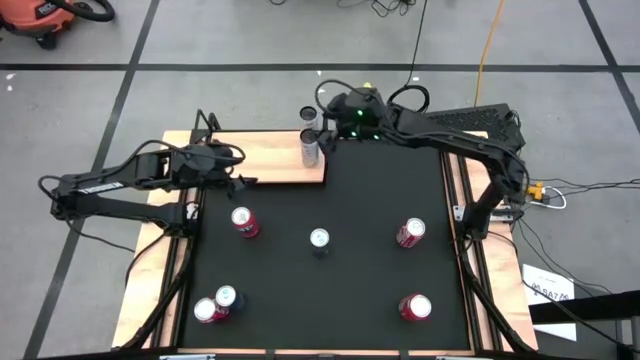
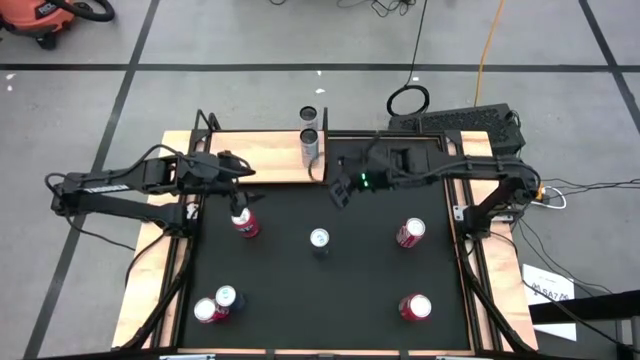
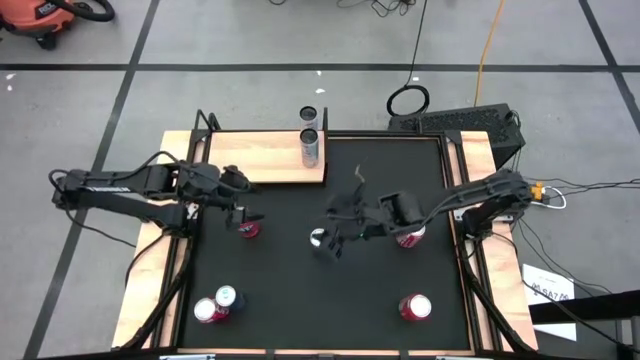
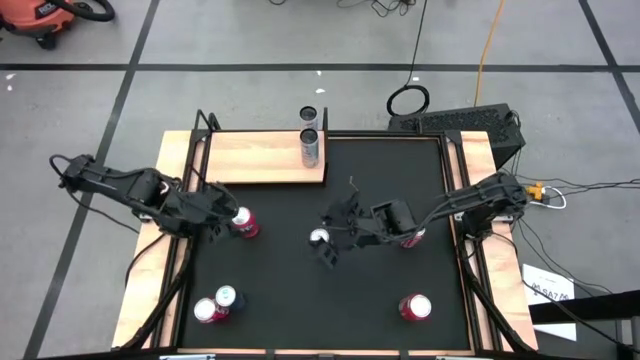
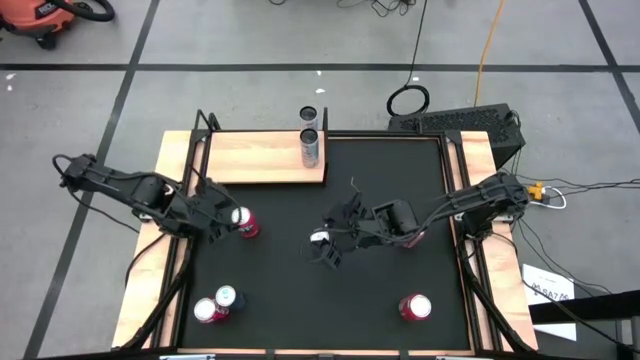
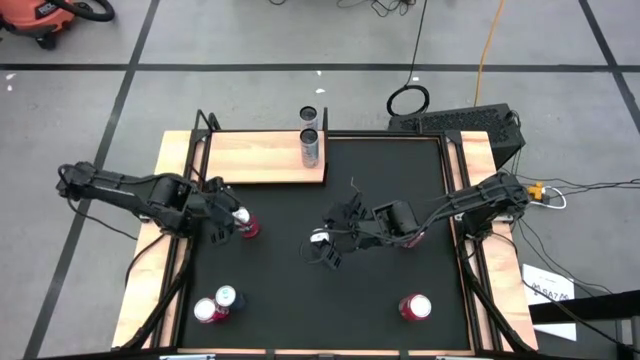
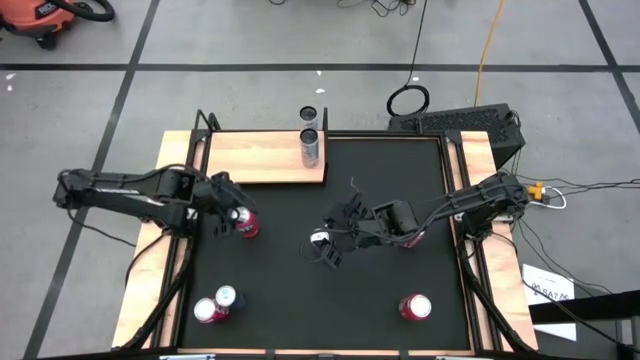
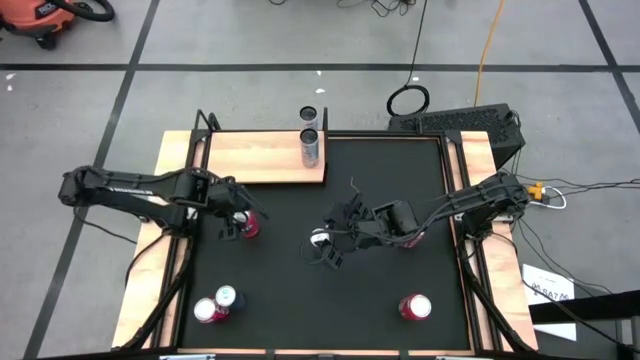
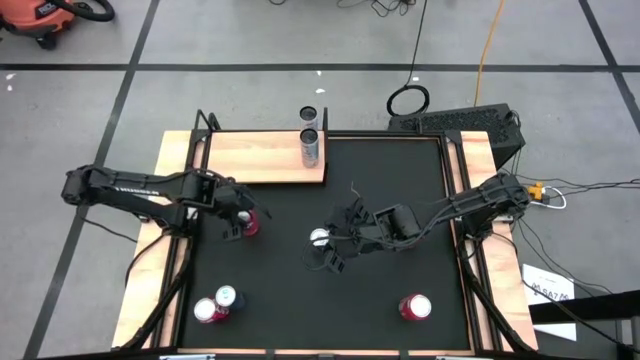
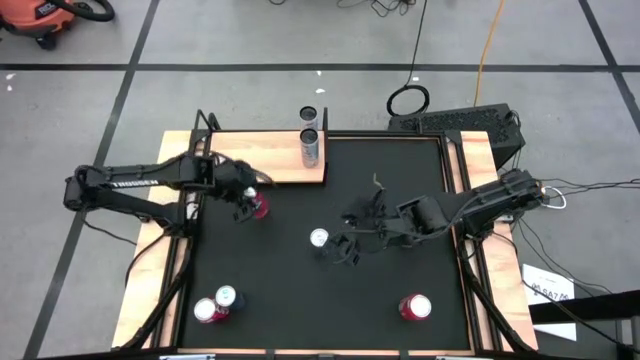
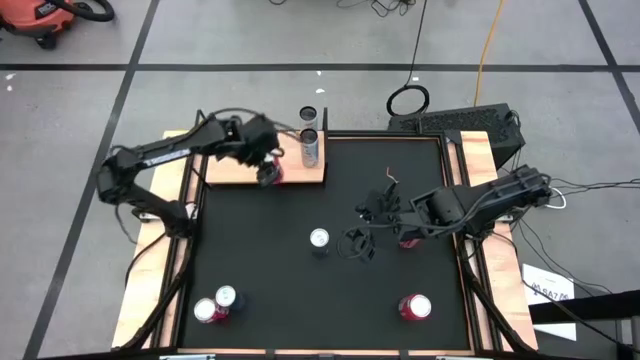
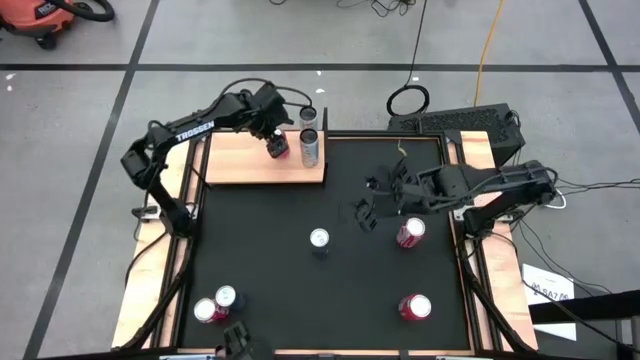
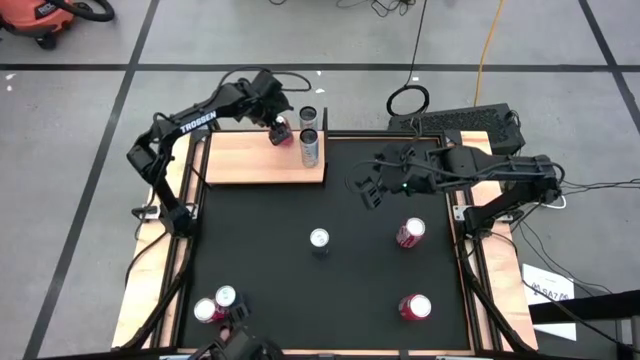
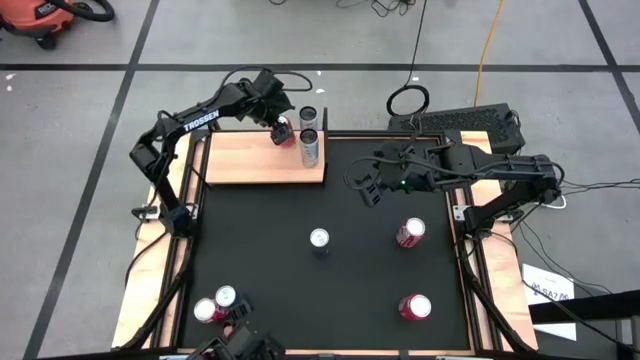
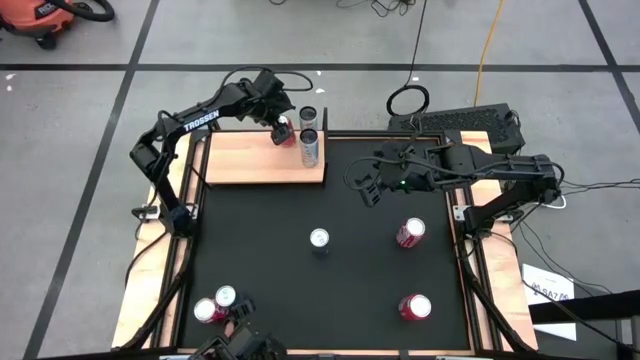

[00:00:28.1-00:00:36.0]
Task: Place canned beverage on shelf
Put the top orange soda can on the shelf

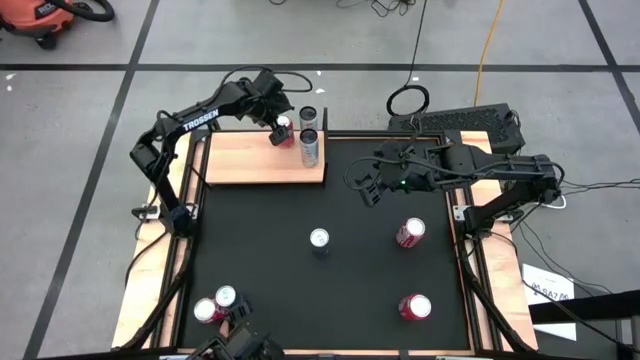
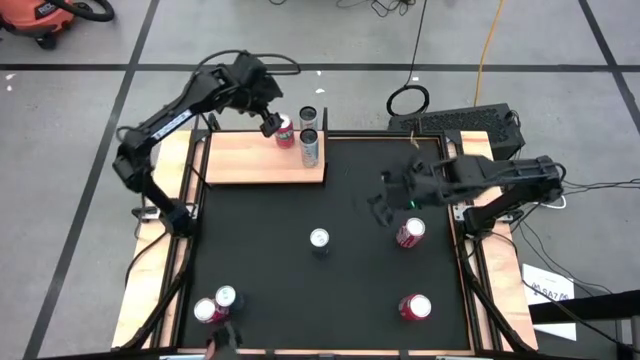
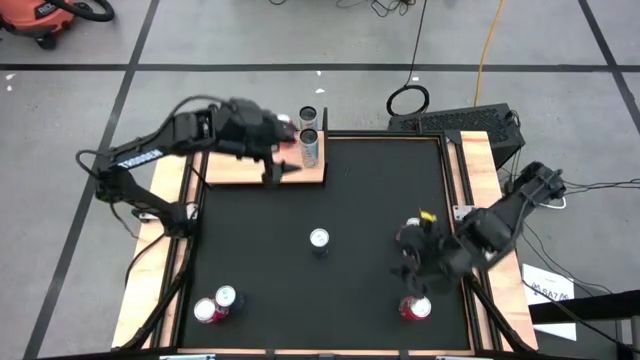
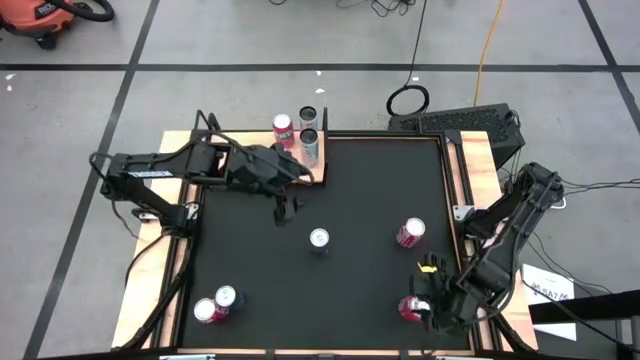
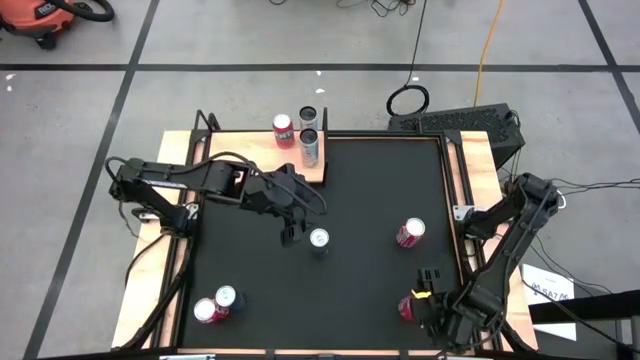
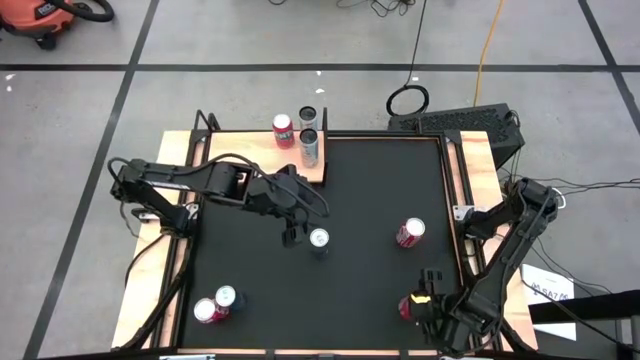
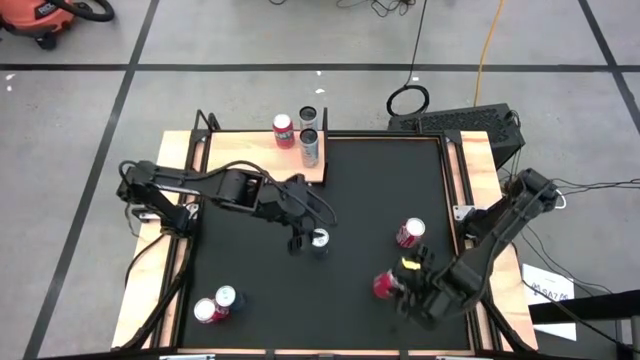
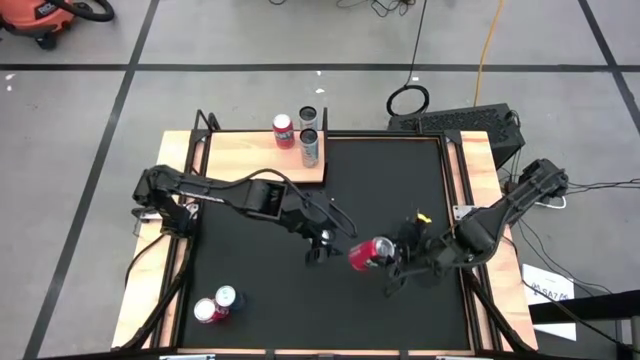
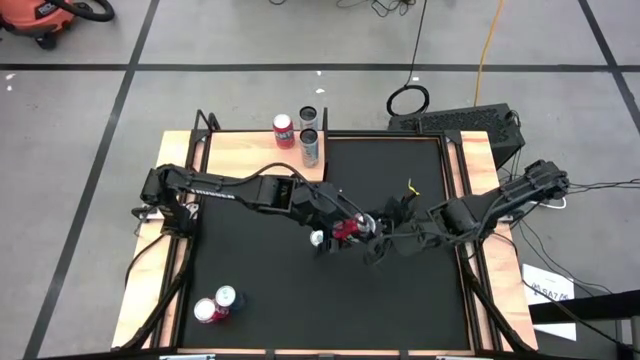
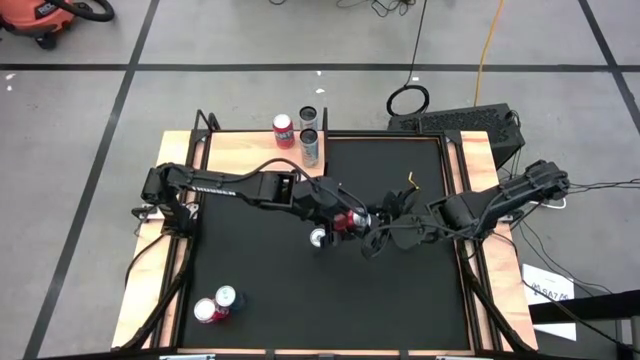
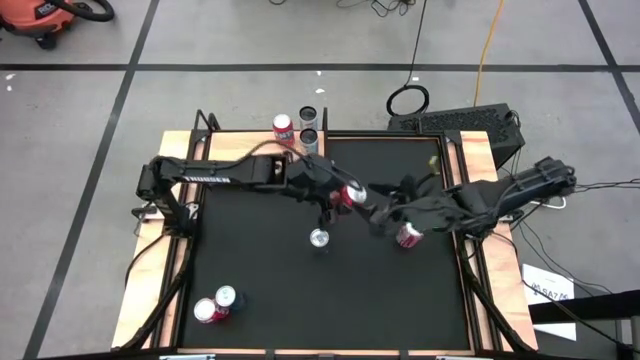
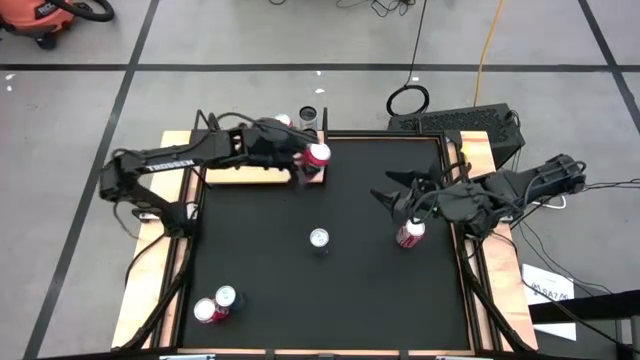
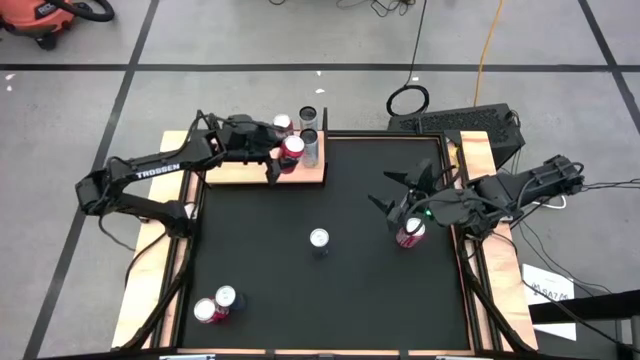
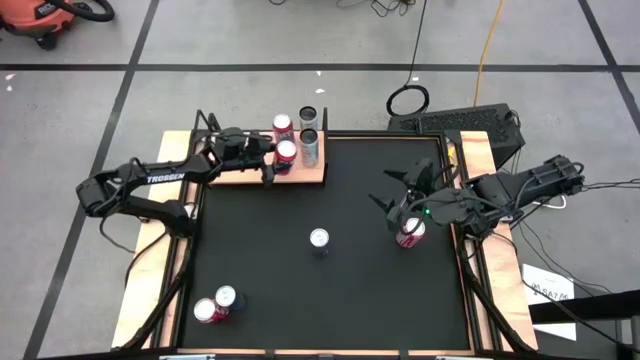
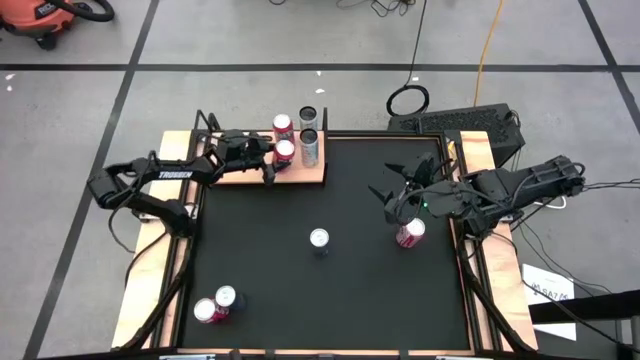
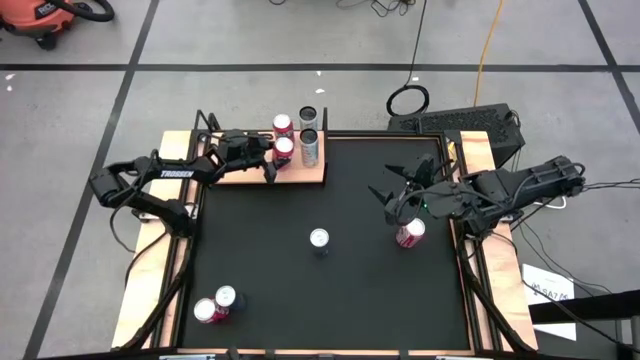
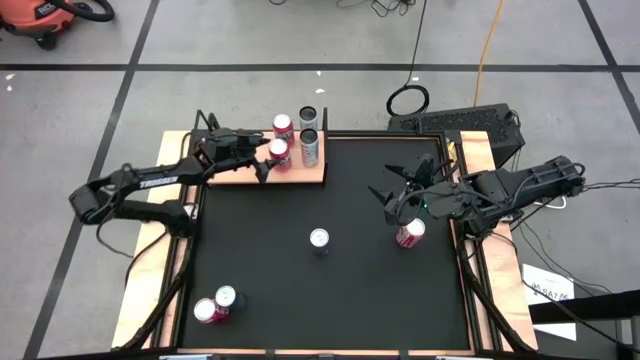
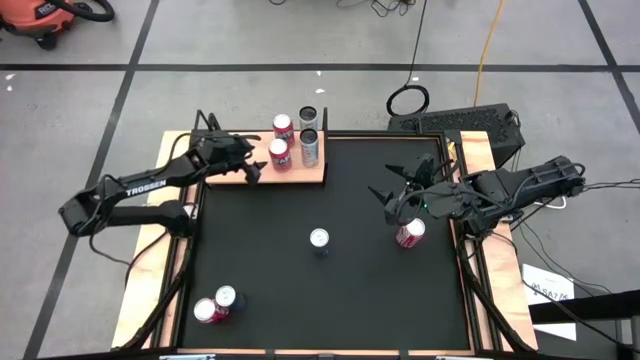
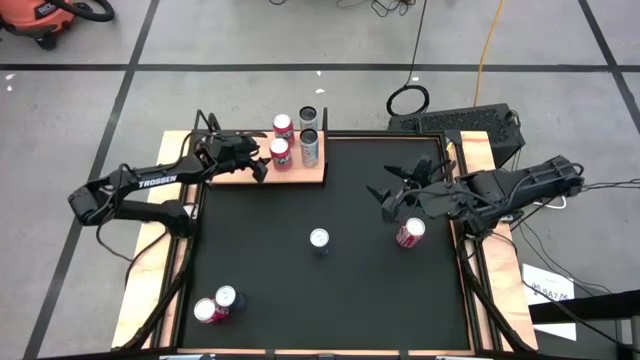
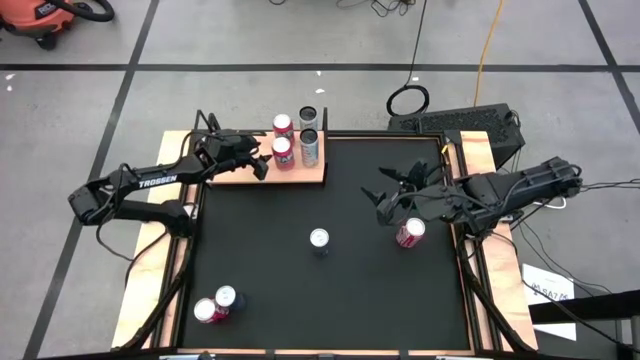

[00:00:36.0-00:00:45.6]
Put the orange soda can aligned with the other orange soda can on the shelf

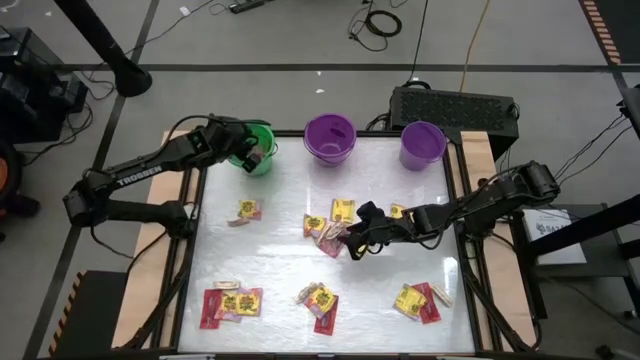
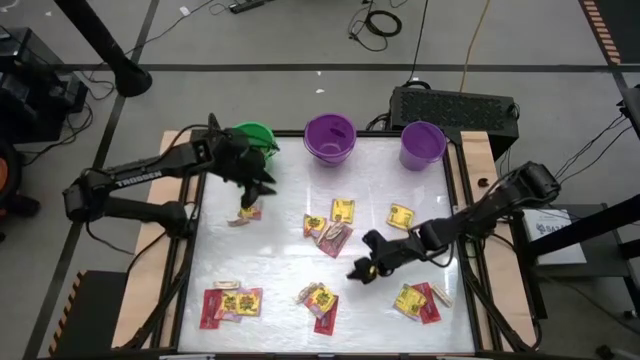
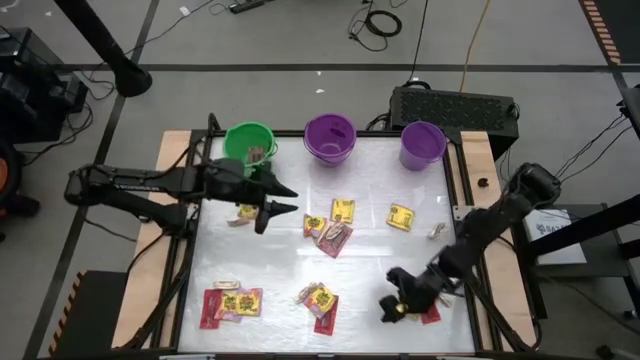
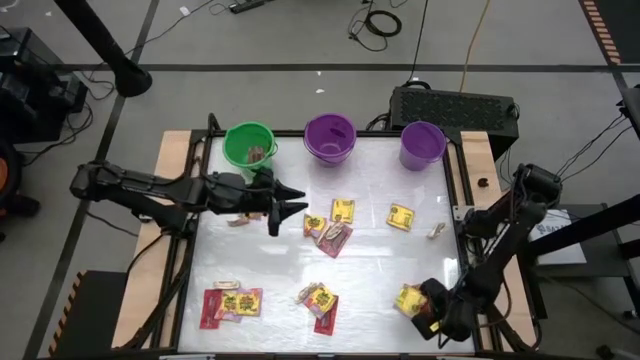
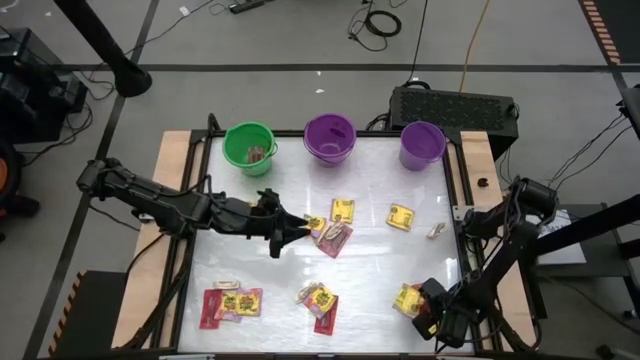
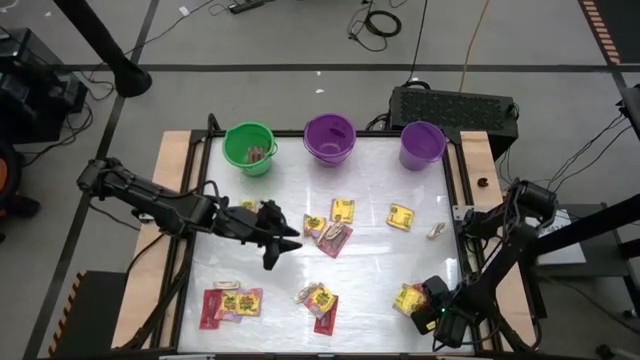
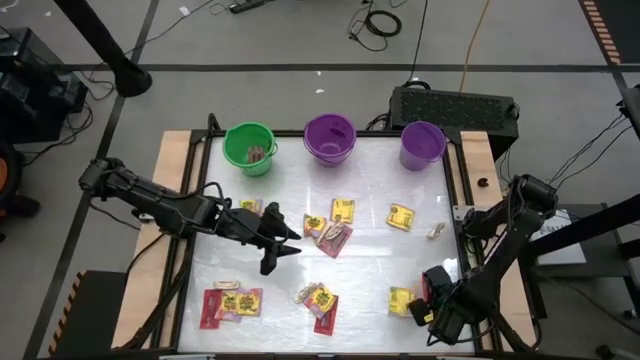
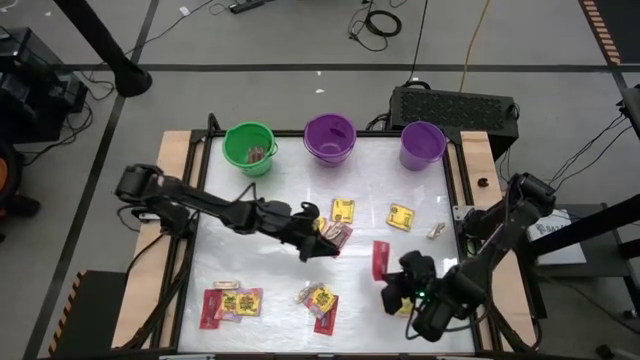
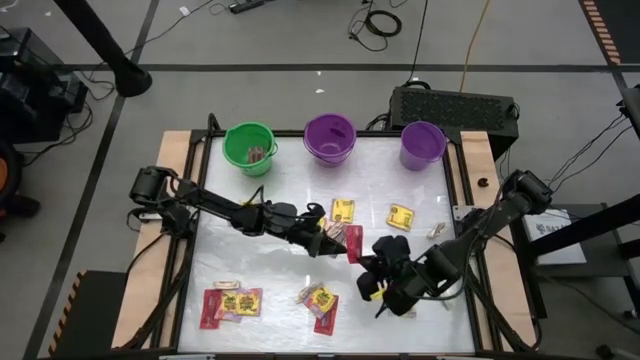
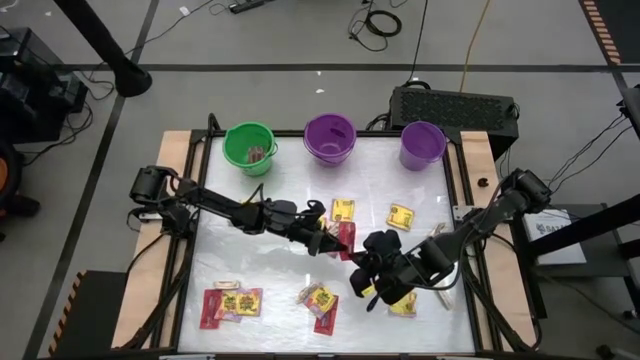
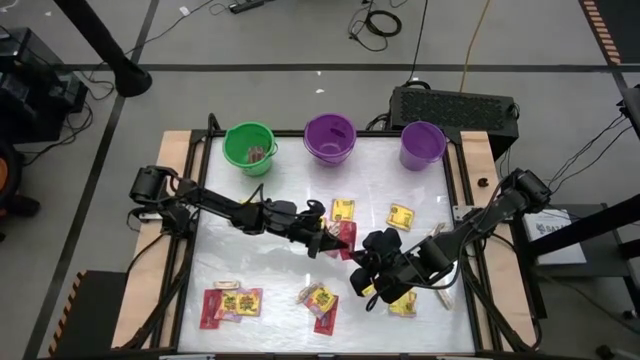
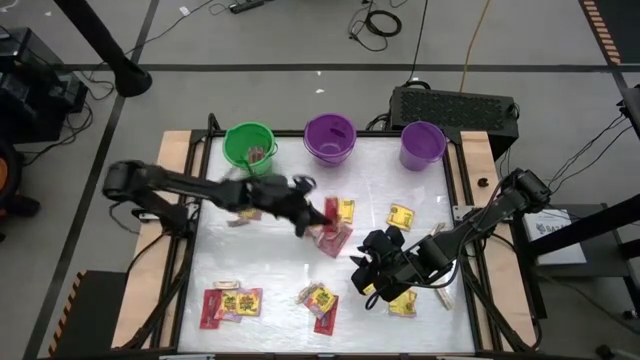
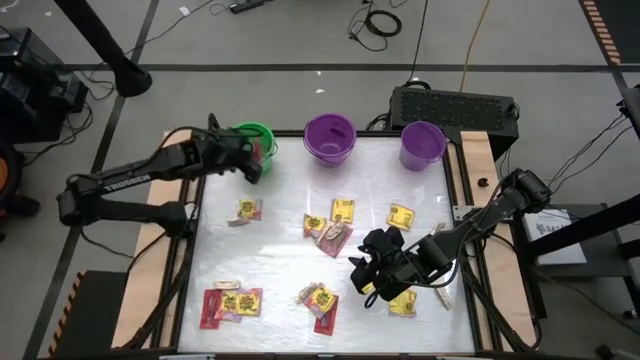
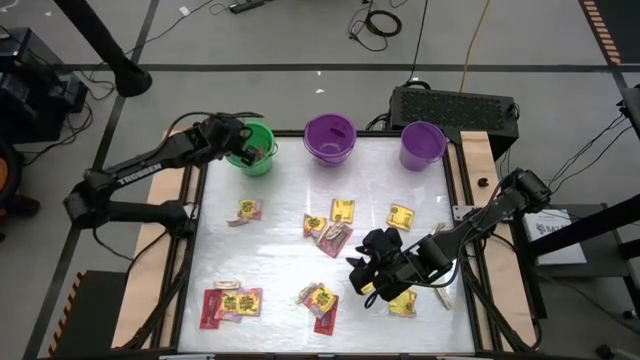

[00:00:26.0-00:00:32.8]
Task: Sort candy by brand, put in halloween buckets
Put the red candy pack in the green bucket
